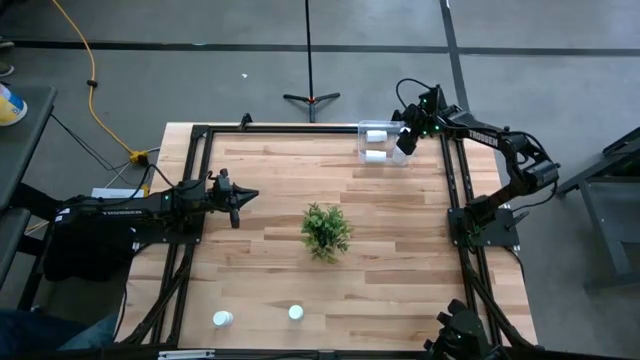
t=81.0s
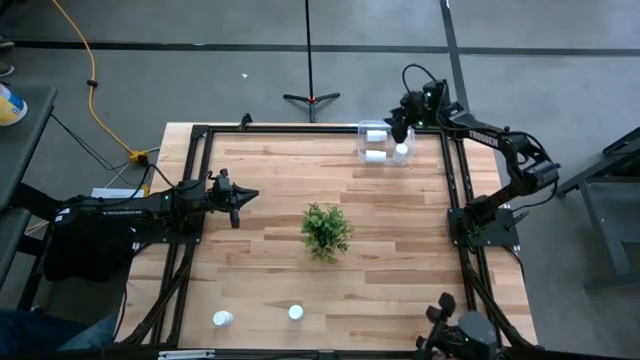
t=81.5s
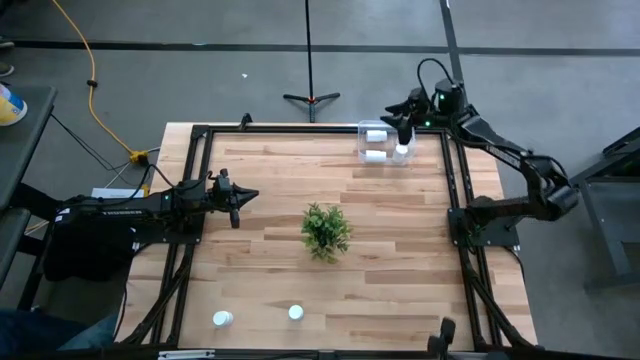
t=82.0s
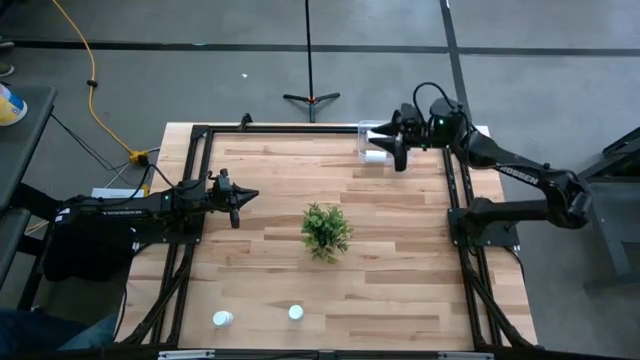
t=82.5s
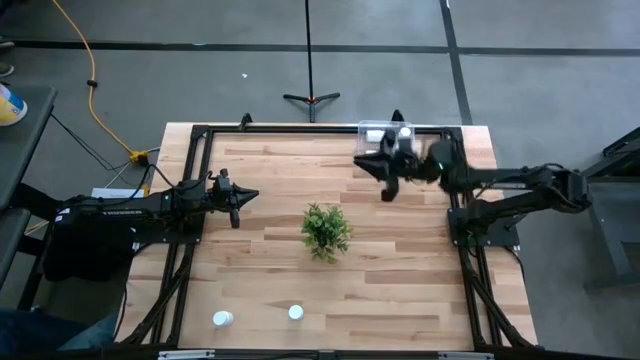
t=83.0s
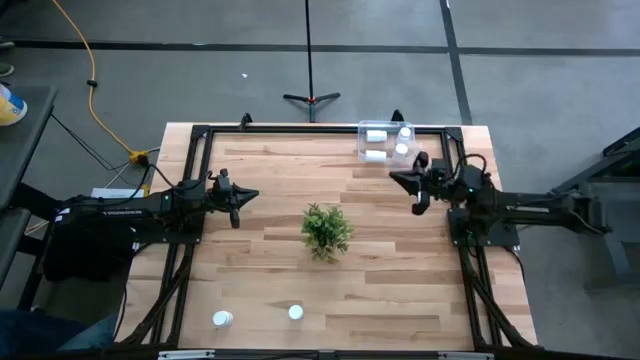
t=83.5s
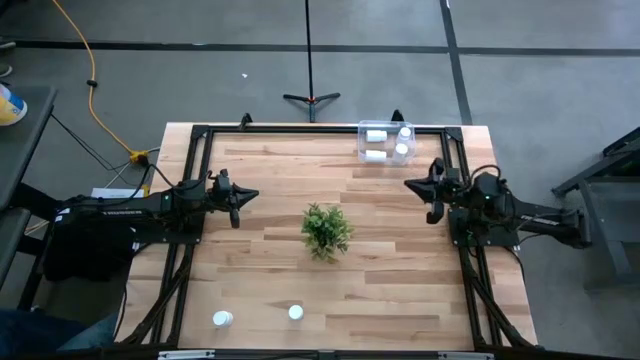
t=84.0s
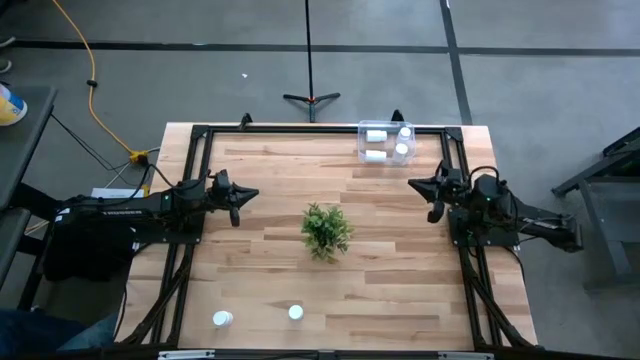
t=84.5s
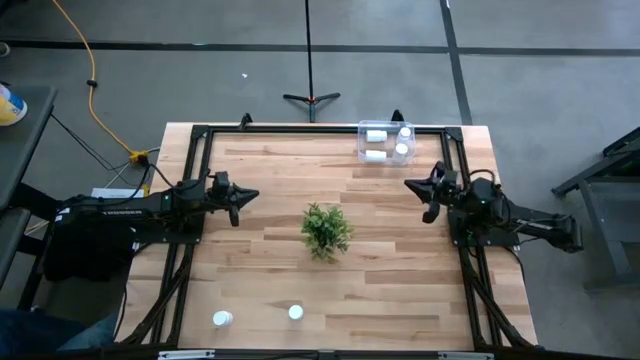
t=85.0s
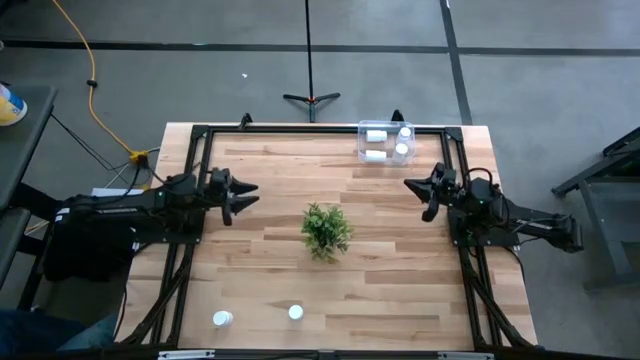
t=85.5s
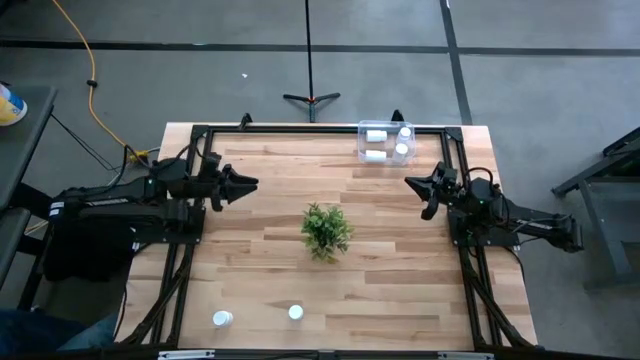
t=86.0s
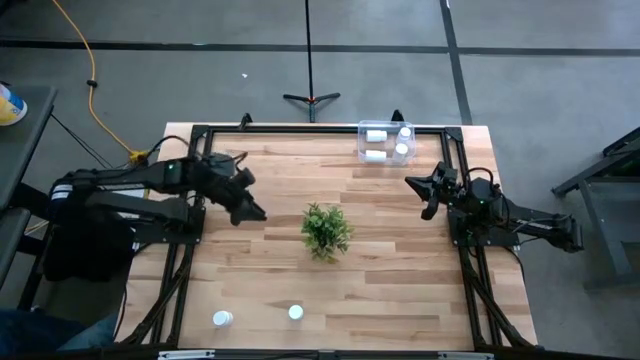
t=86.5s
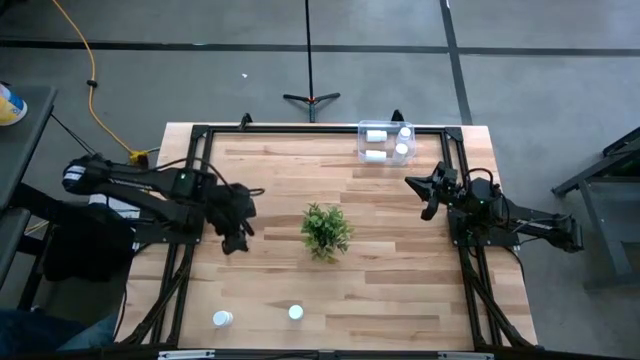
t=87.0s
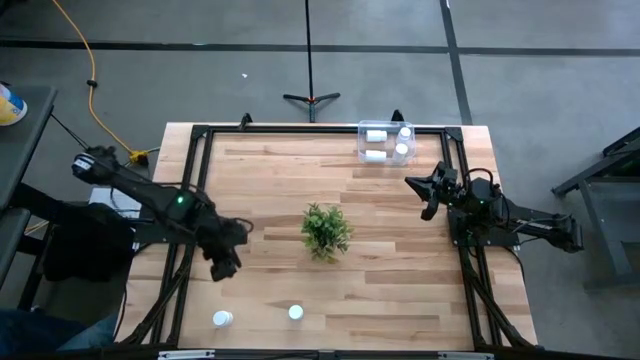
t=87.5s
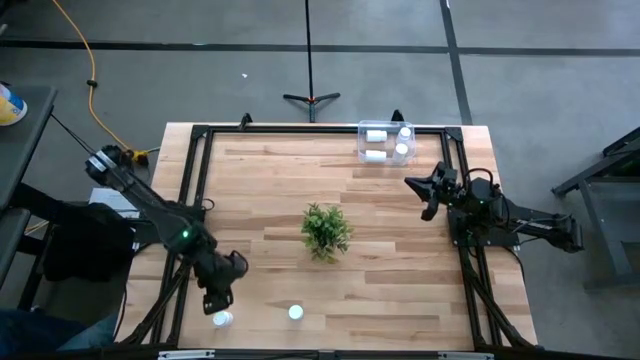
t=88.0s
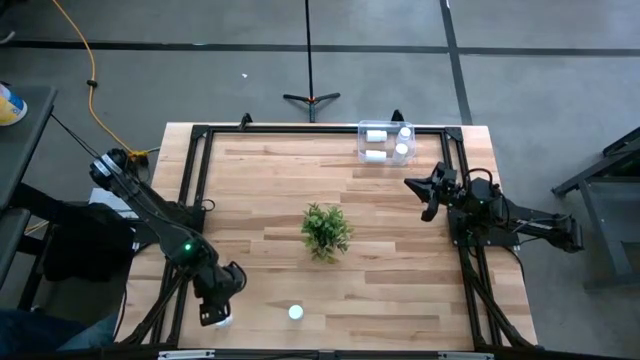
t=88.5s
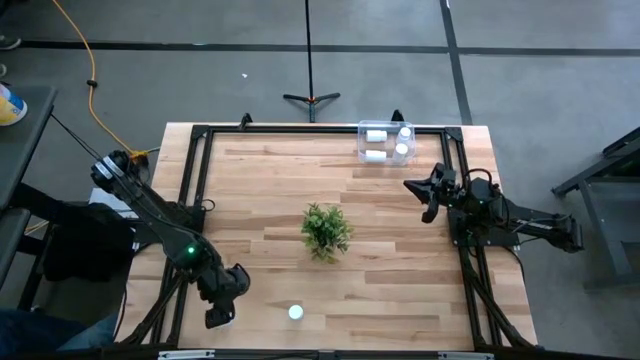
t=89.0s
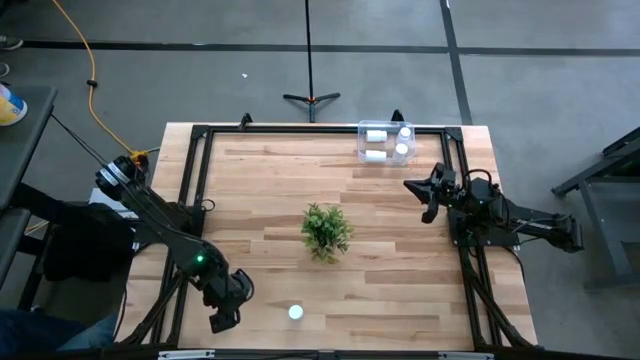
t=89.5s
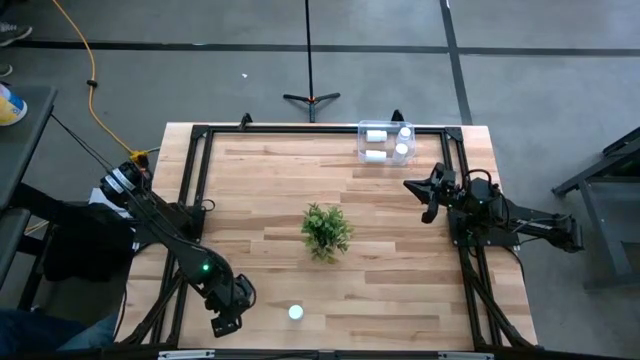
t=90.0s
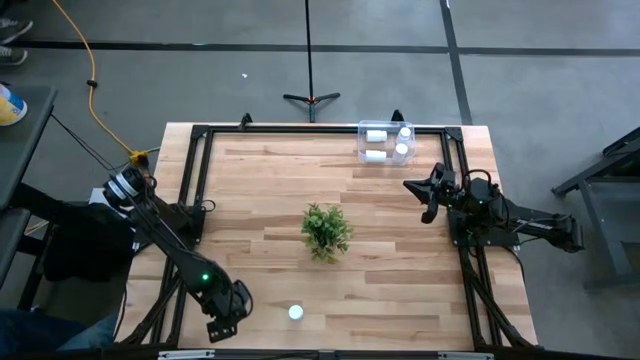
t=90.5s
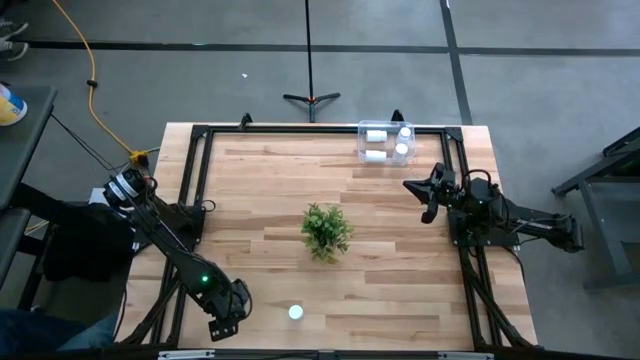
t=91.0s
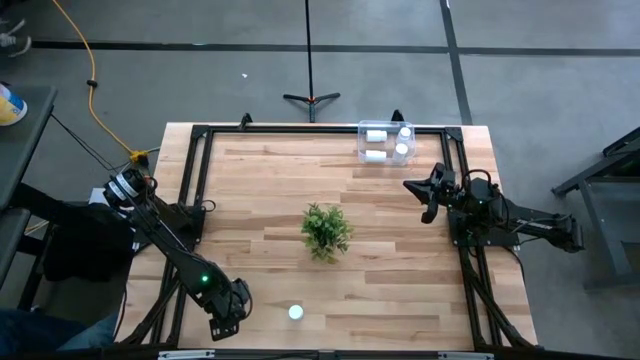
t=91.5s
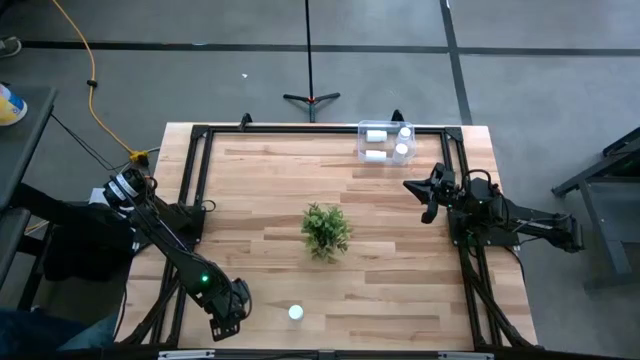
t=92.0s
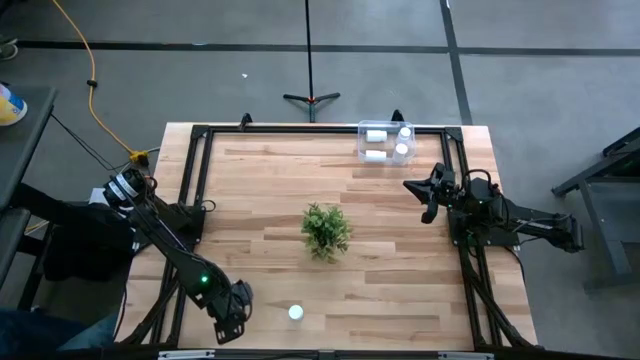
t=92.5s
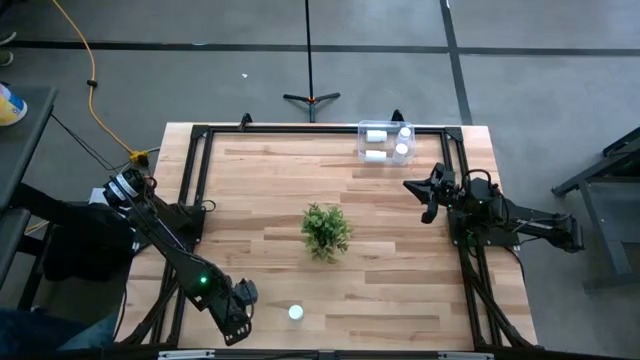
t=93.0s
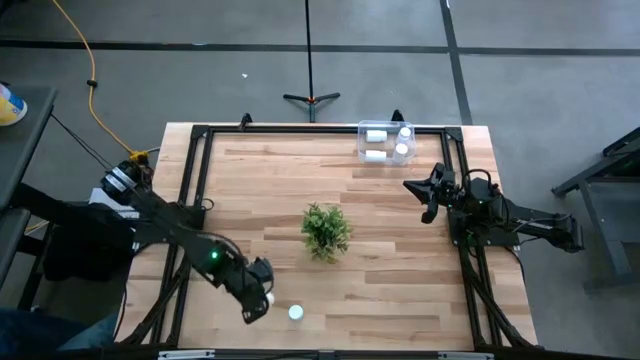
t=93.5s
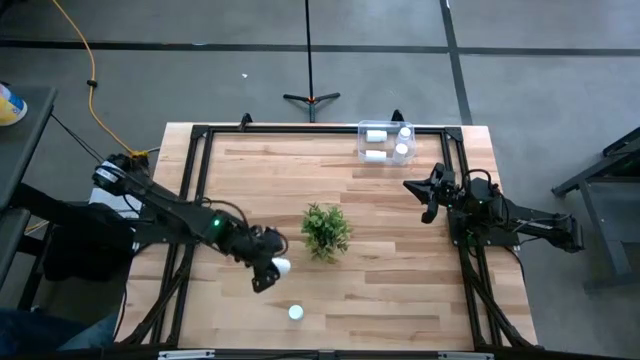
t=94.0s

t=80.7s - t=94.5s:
Task: Pick and place pill bottles into a basket
Put the left white pill bottle into the transparent bin

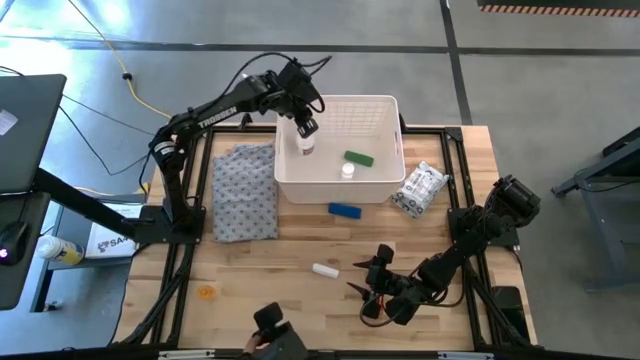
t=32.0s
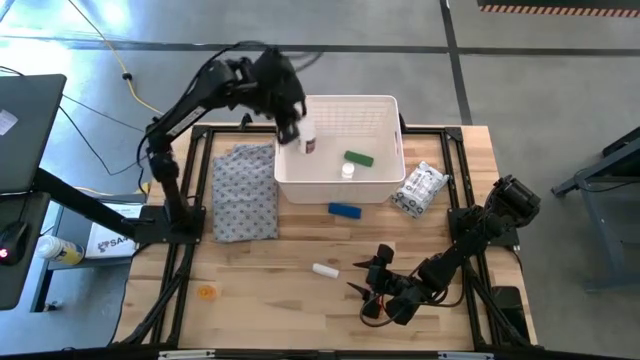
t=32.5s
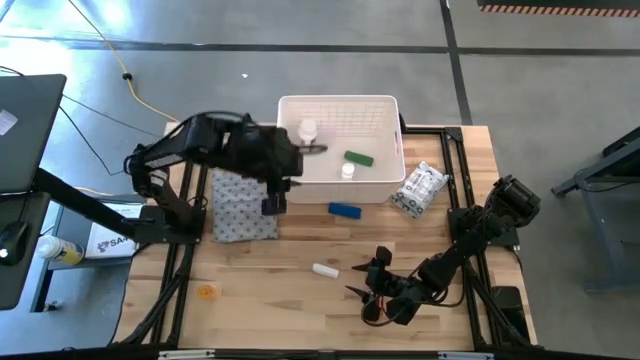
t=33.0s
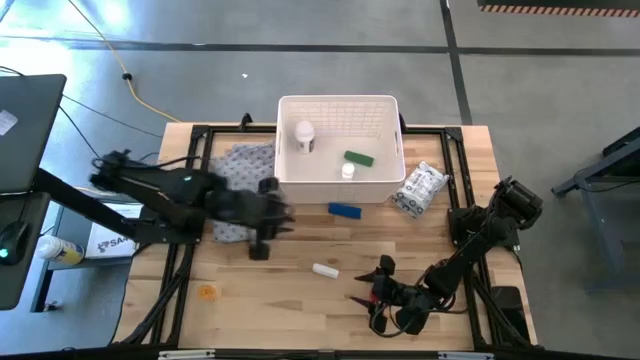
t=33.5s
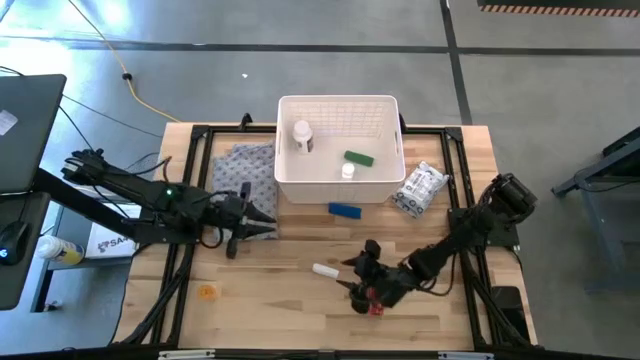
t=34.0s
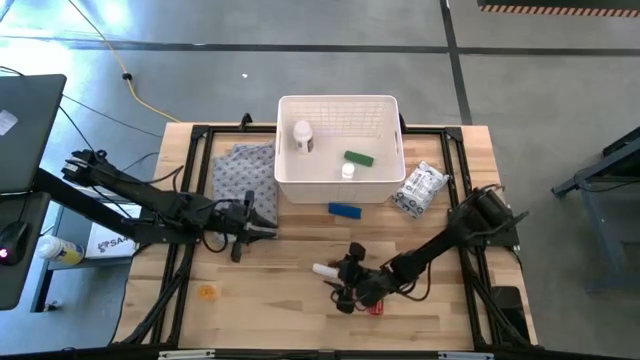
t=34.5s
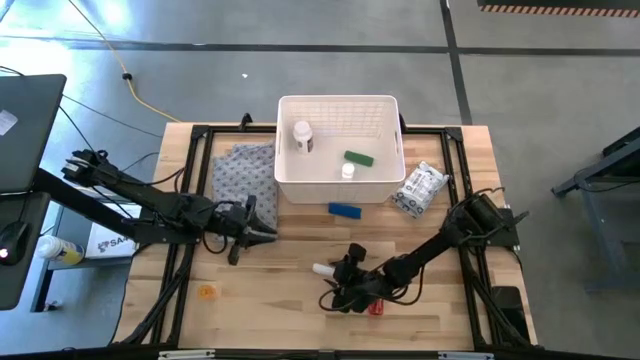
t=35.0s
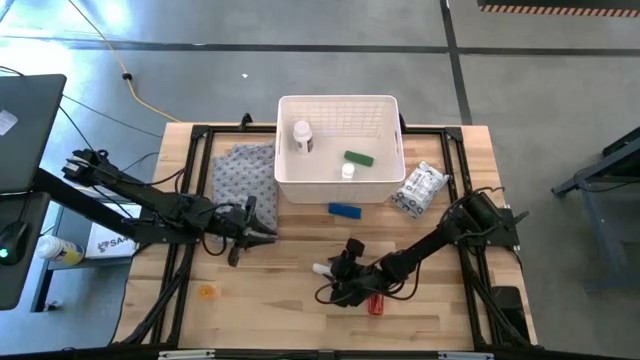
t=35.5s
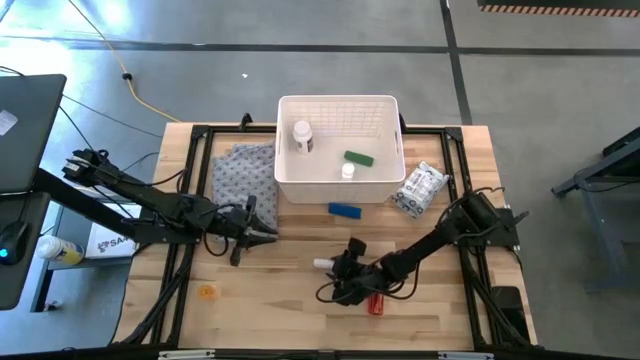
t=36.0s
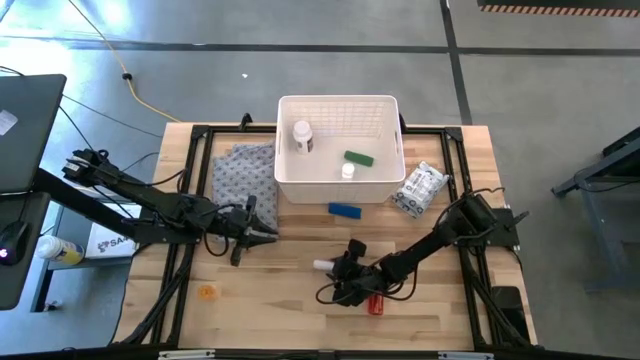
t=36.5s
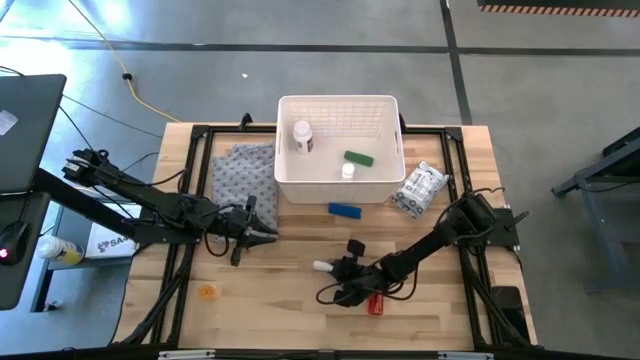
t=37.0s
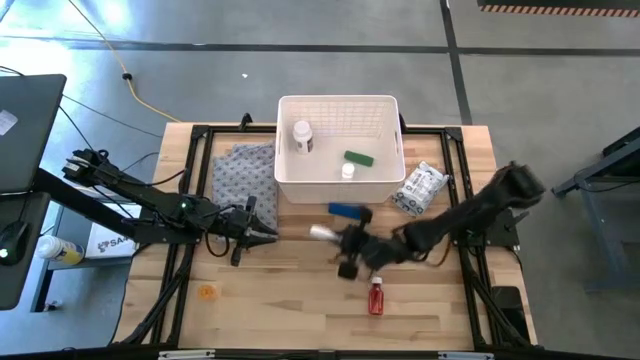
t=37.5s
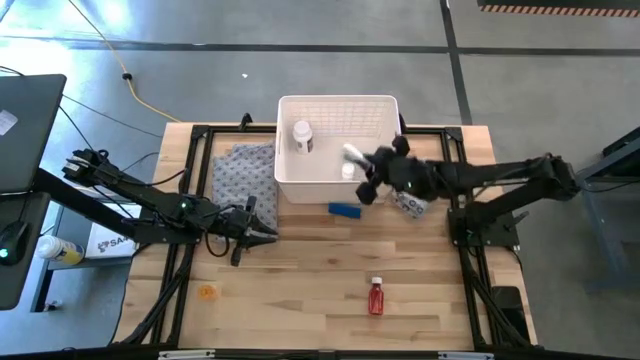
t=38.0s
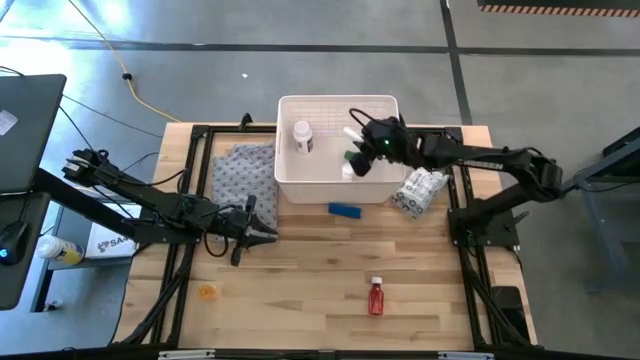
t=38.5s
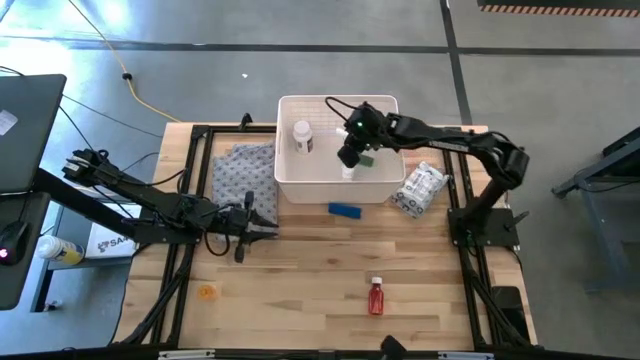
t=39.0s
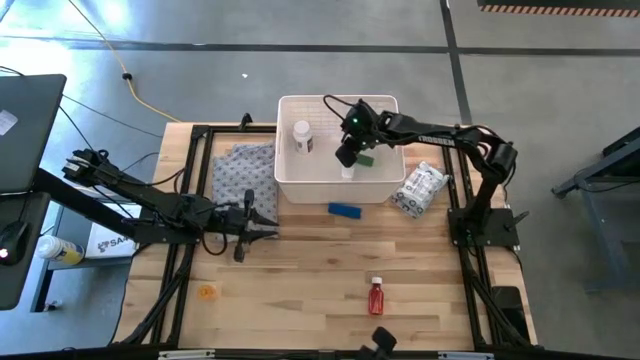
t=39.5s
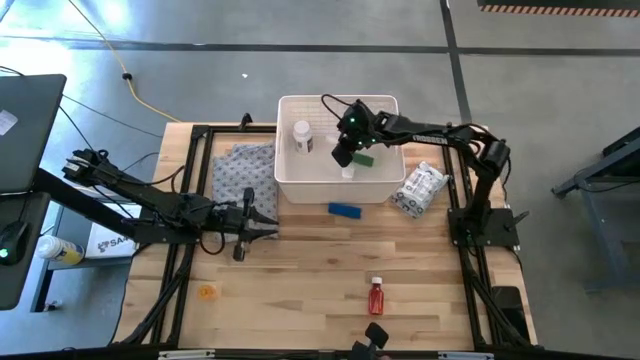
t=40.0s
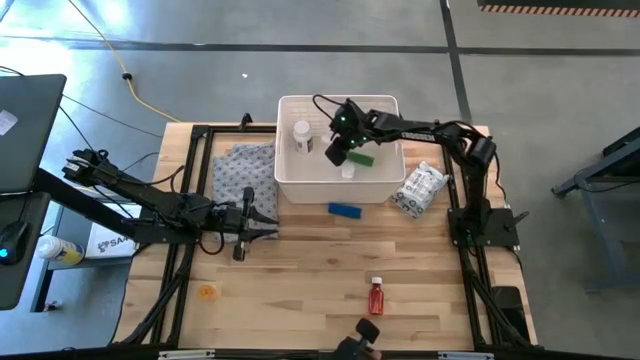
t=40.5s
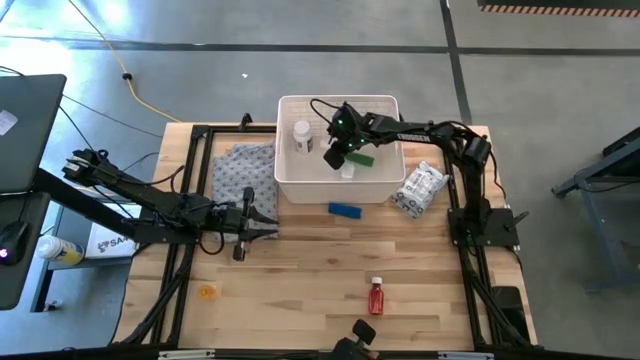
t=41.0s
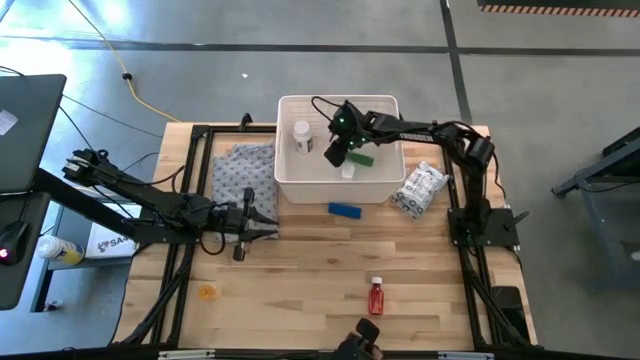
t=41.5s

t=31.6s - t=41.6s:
Task: Pick & place medical supplies in basket/bin
Put the white rolled gauze into the white bin
